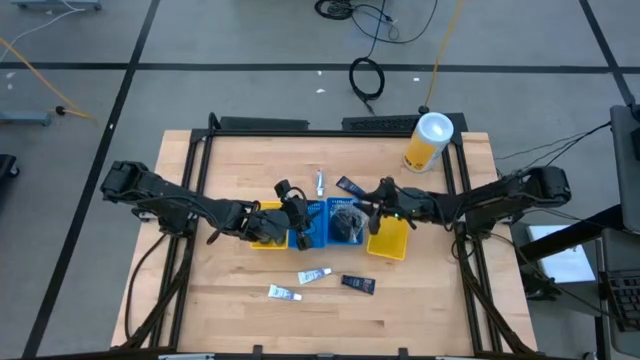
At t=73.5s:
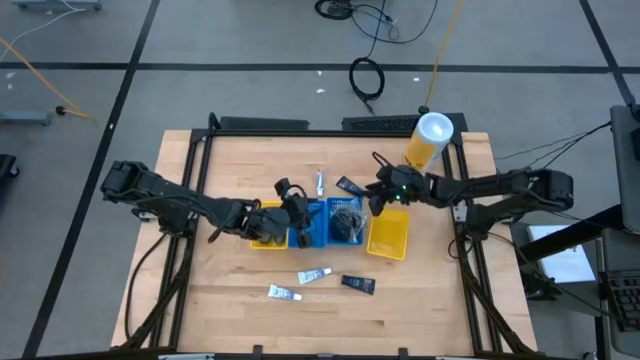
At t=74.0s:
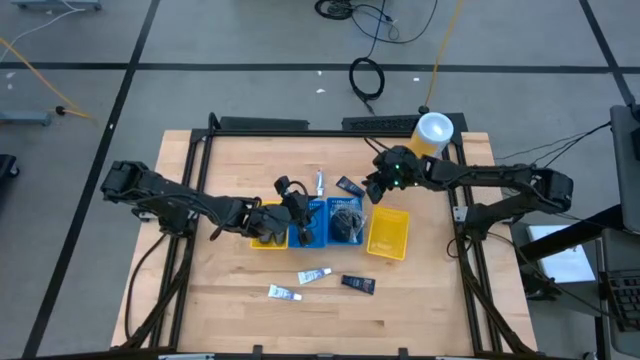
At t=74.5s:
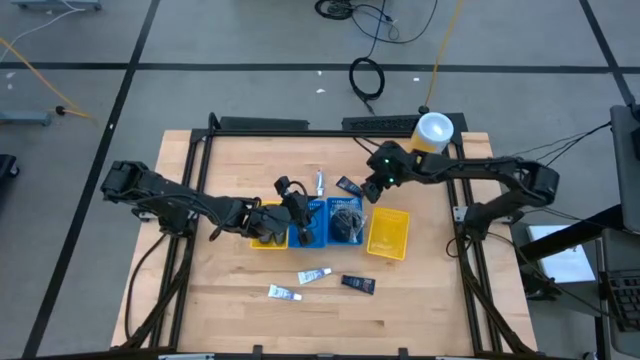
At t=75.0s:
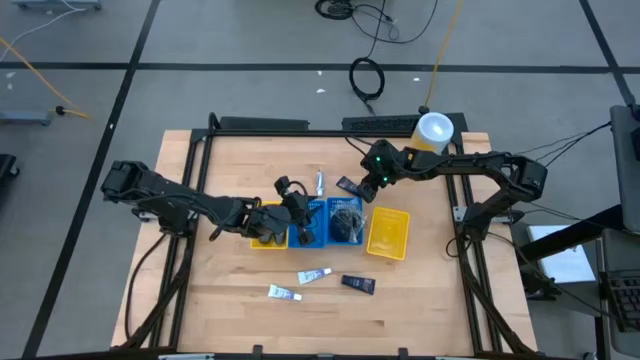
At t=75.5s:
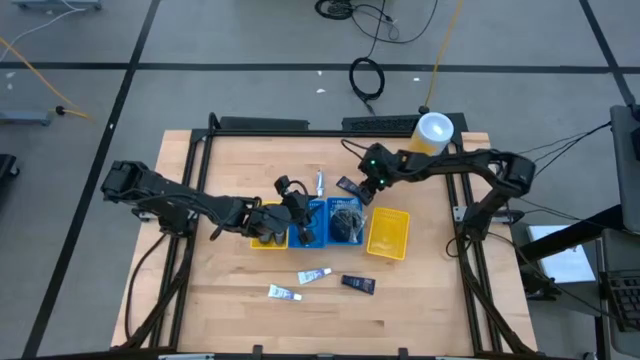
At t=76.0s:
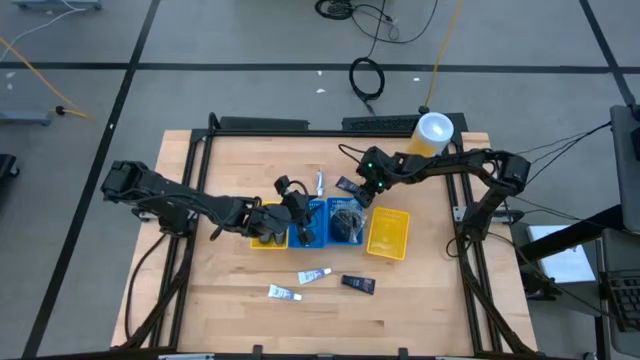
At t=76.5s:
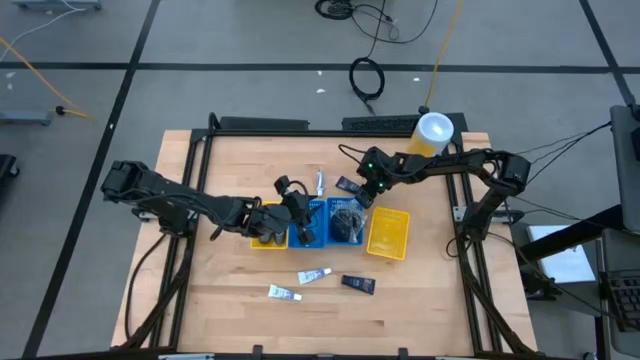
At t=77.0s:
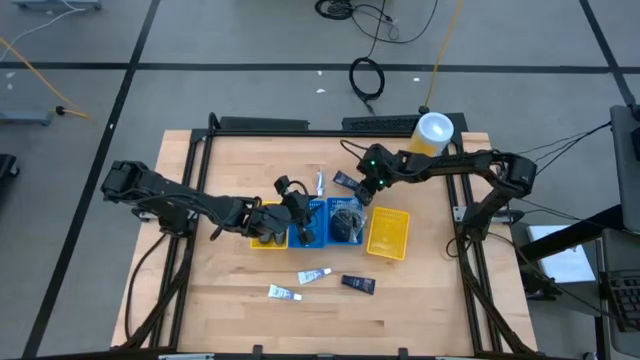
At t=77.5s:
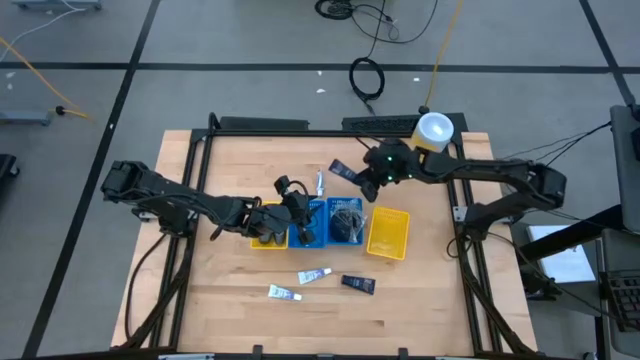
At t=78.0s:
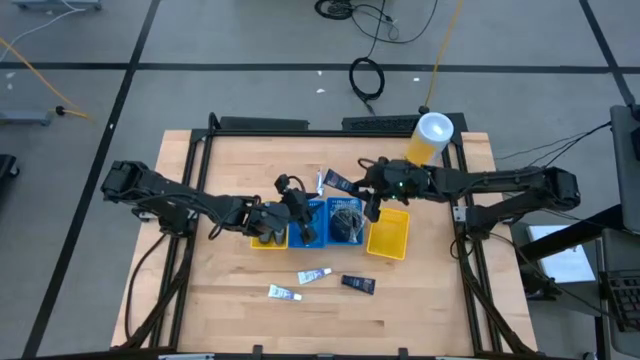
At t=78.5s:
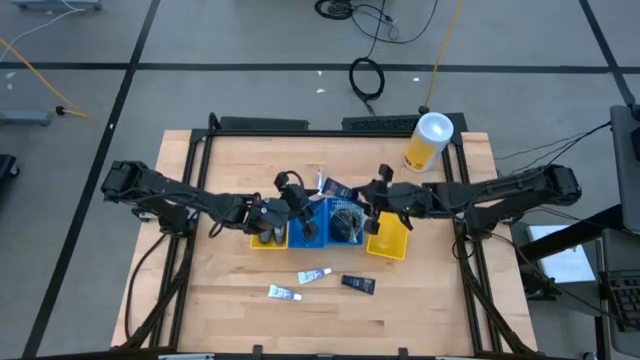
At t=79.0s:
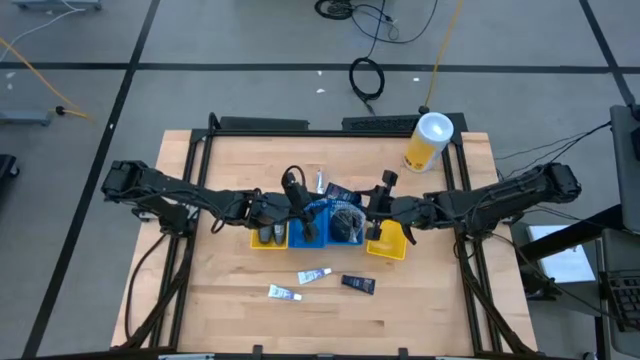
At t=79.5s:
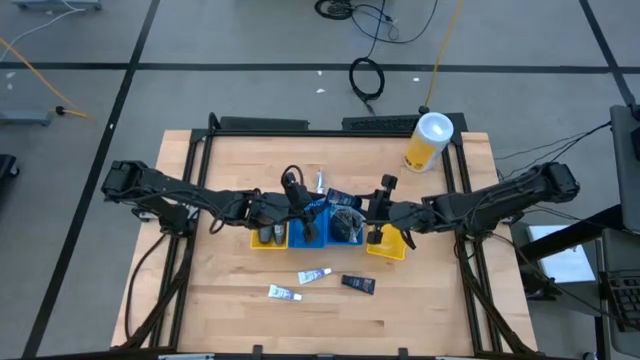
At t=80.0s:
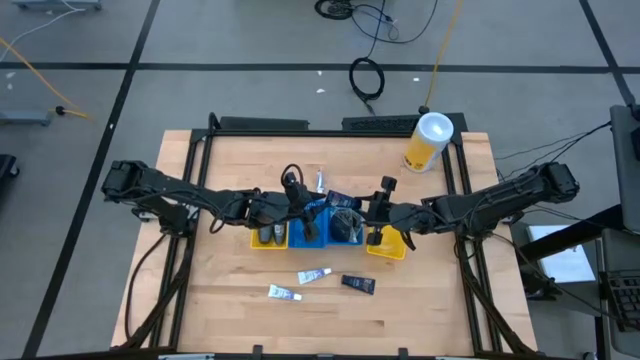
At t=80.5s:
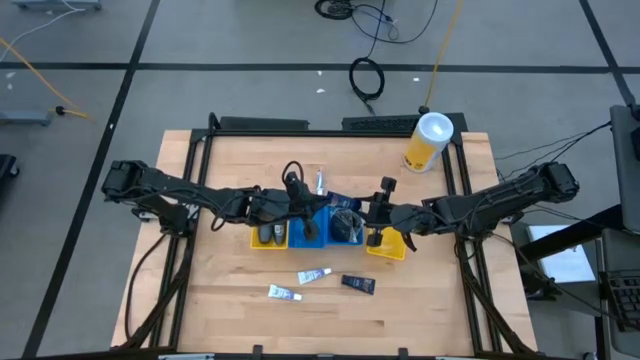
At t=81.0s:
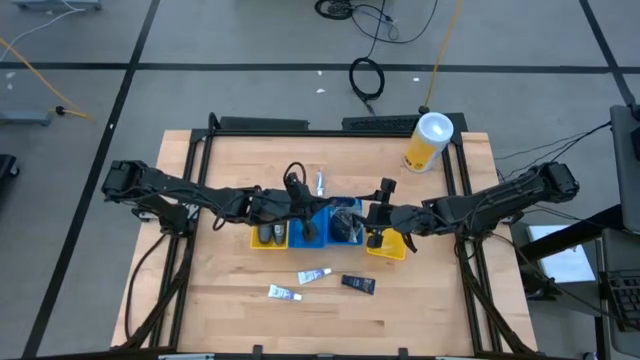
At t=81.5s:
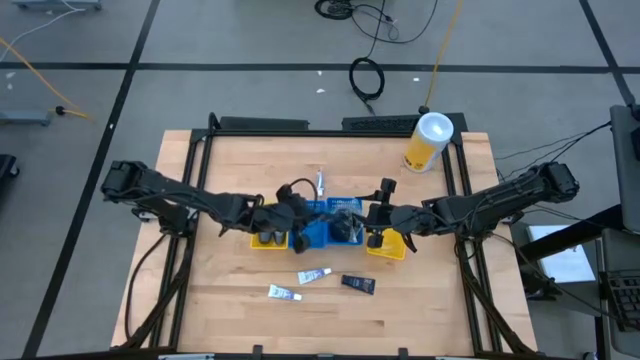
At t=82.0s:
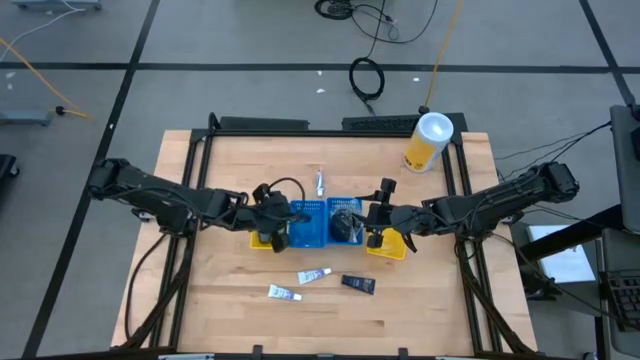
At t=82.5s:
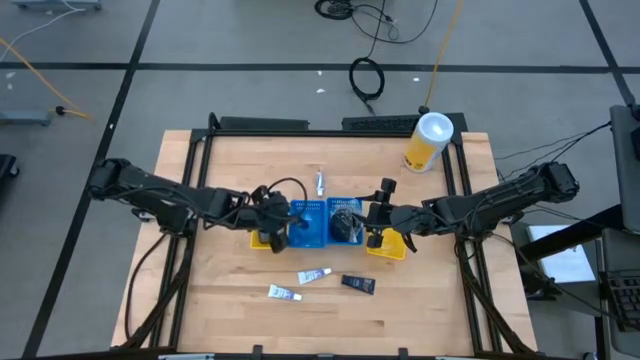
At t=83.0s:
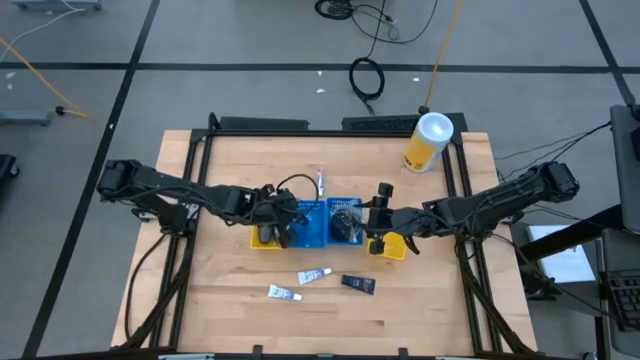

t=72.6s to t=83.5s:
Task: Pick & Place Travel size toiletries
Put the shave cream into the left blue bin

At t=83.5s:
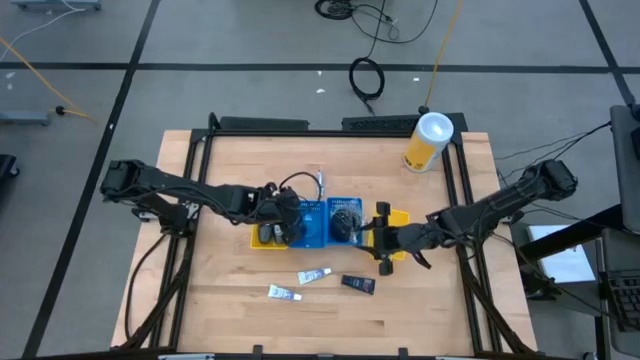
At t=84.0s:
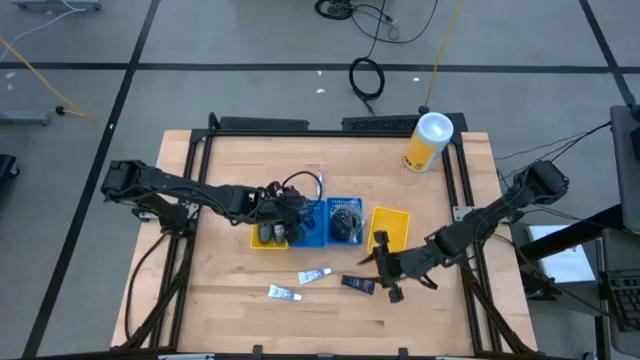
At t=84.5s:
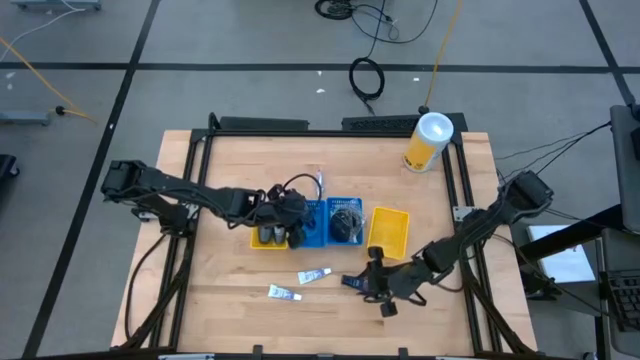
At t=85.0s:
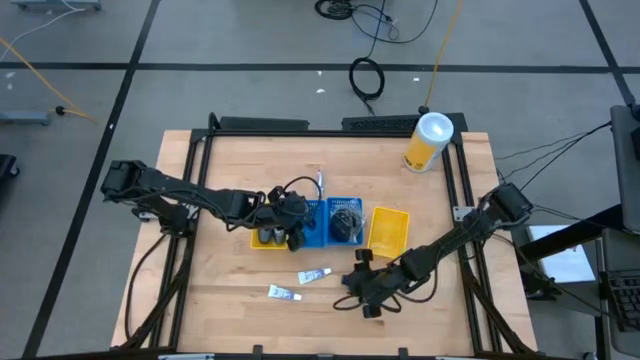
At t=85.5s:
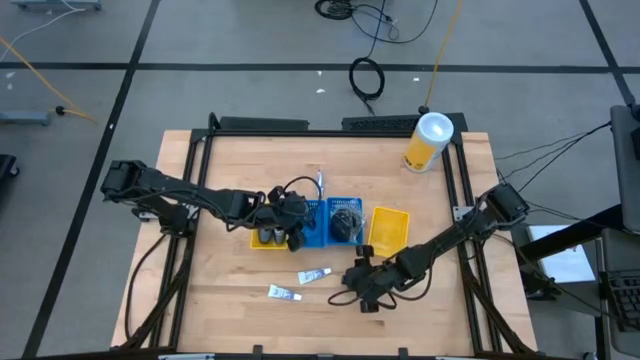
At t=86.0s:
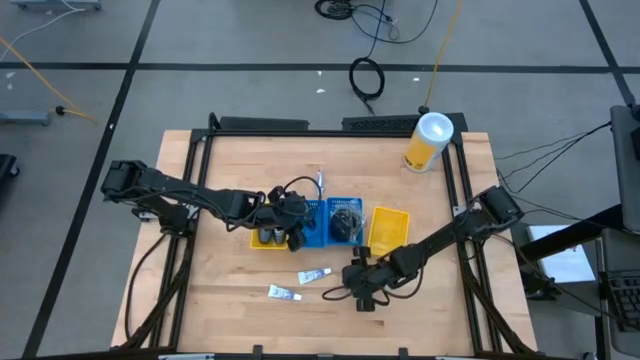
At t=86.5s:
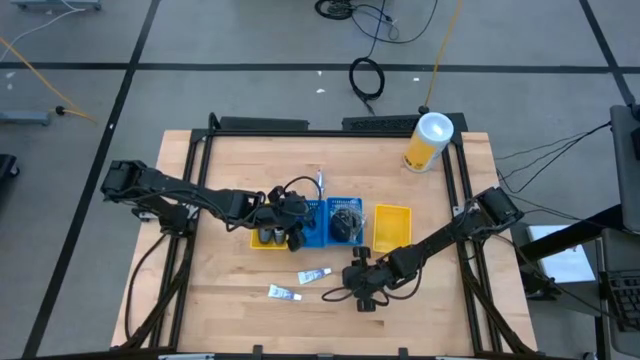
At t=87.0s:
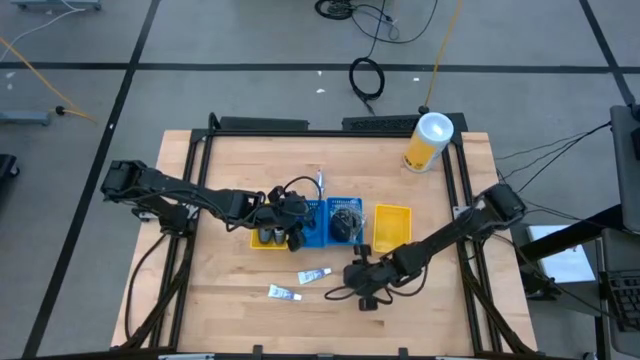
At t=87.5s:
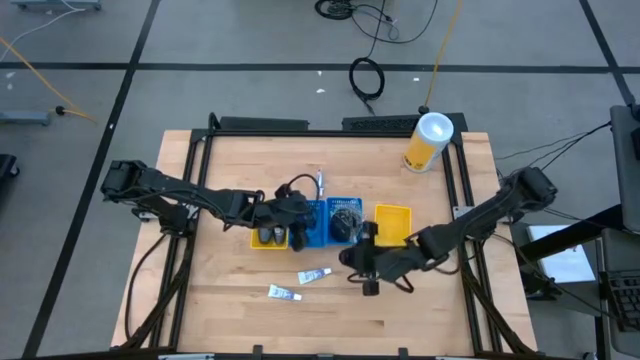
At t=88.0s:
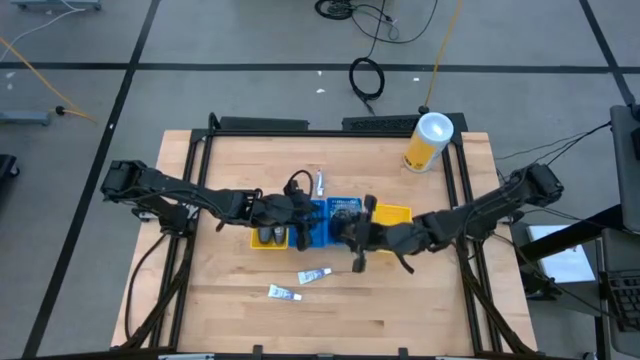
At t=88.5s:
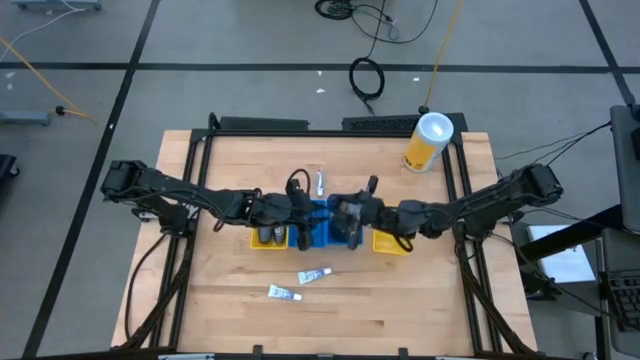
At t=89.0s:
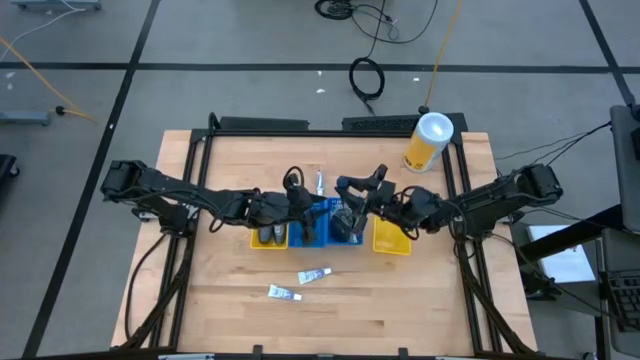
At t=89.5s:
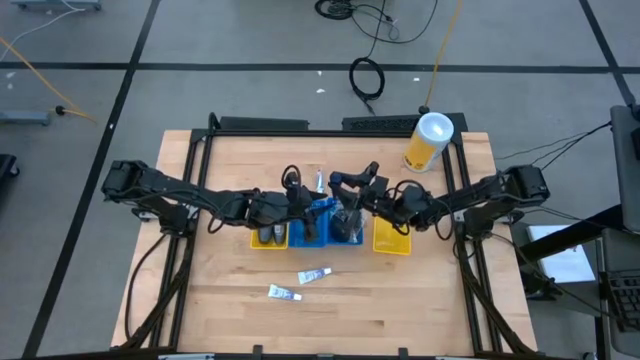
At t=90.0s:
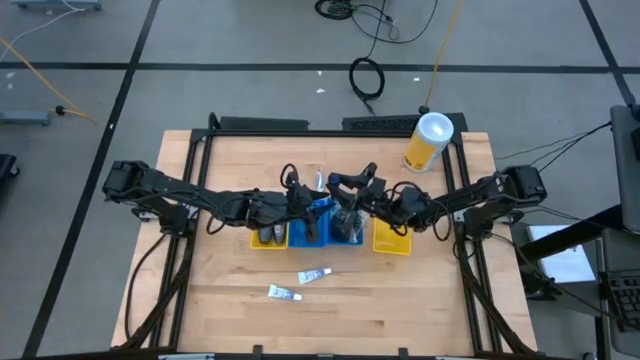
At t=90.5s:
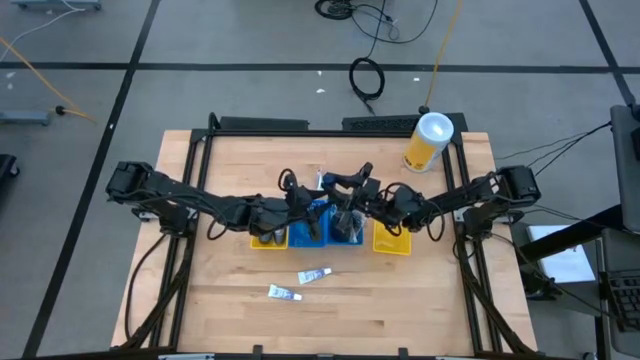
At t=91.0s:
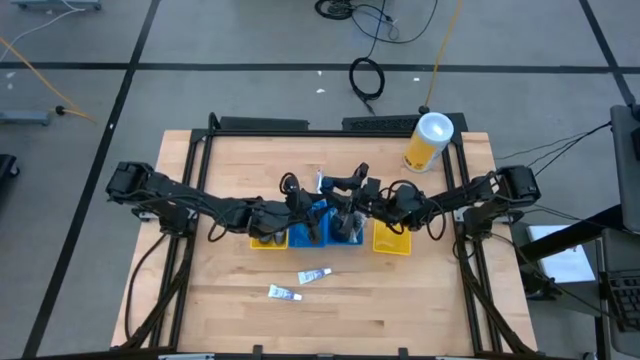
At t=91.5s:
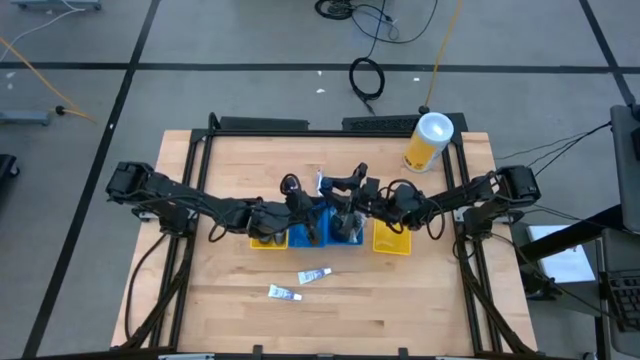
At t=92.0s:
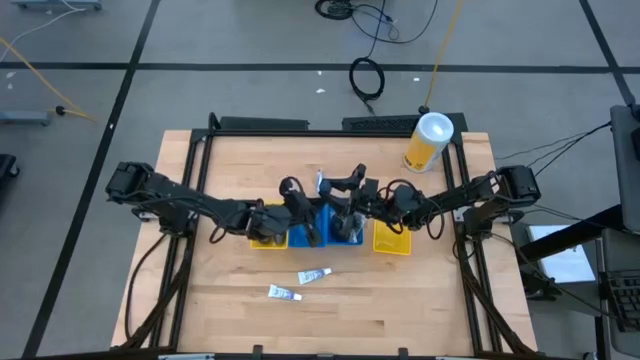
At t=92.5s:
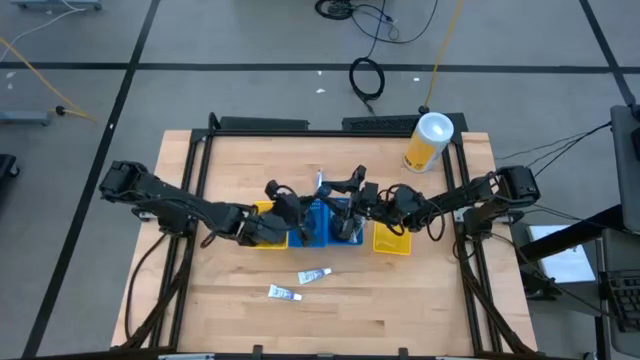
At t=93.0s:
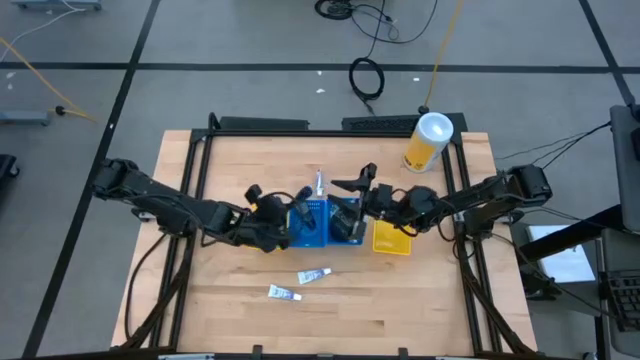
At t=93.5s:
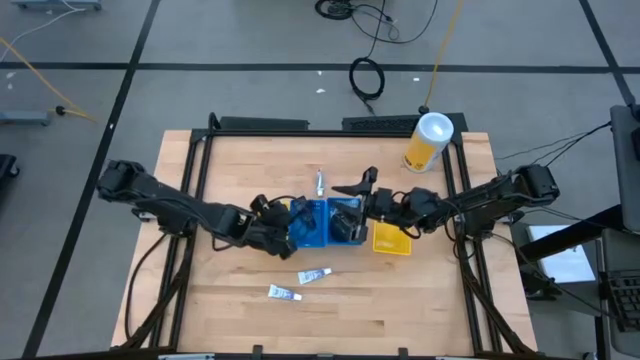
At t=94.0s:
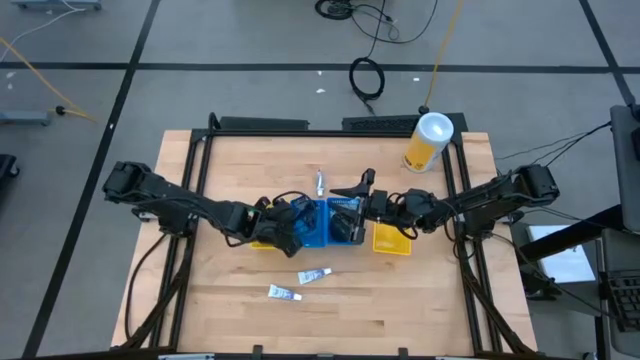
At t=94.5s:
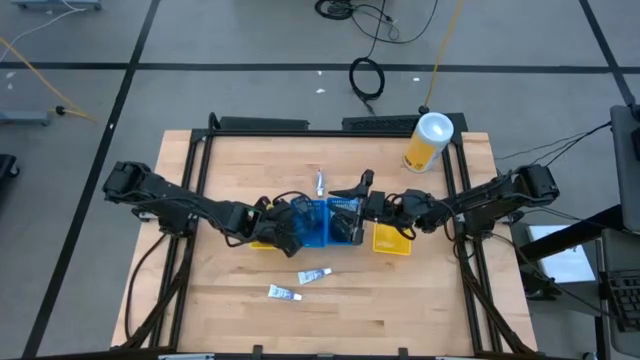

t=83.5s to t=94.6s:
Put the shave cream into the left blue bin
